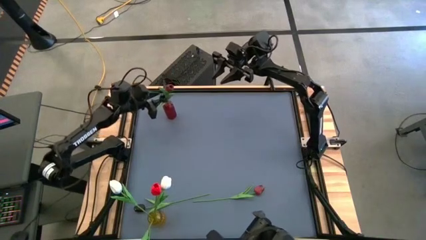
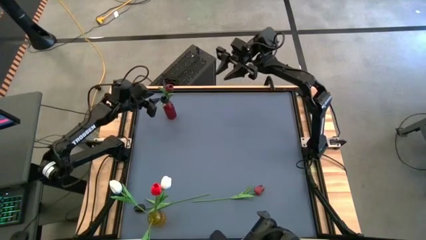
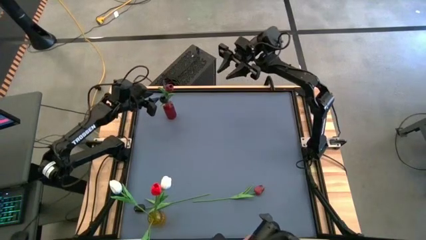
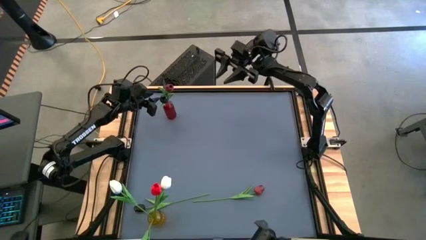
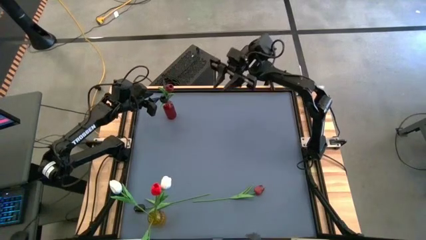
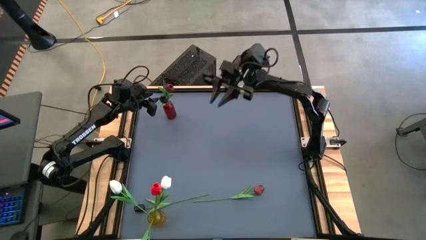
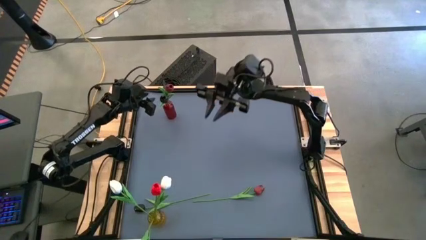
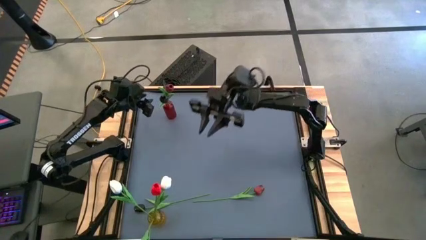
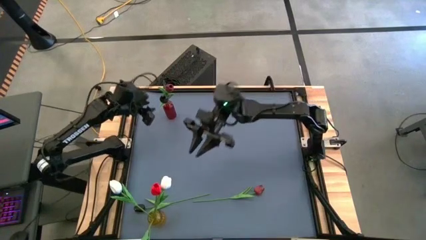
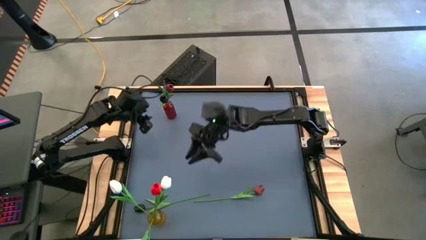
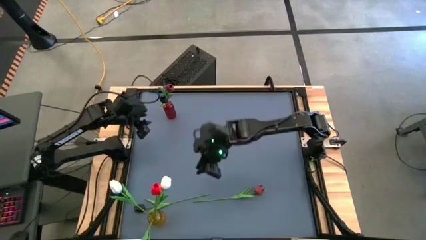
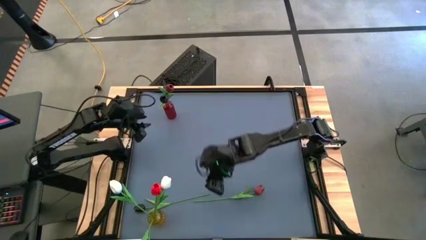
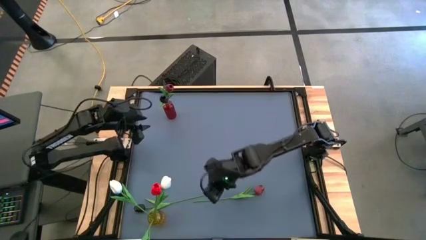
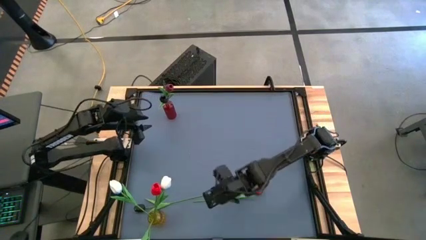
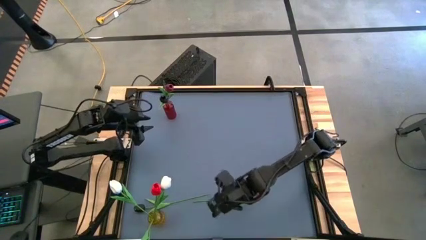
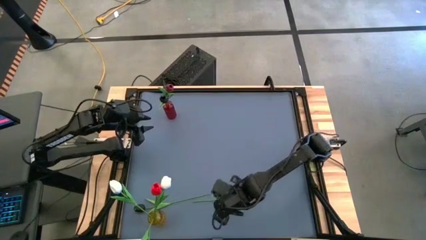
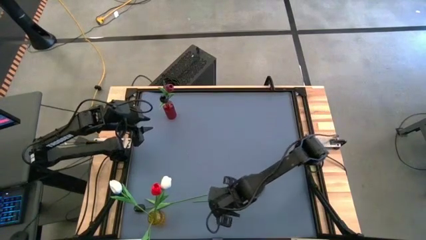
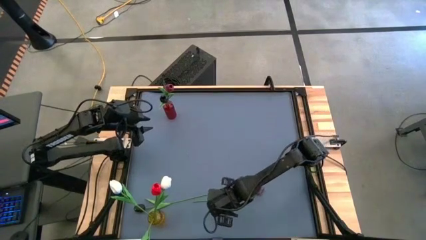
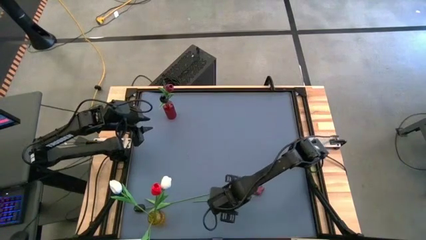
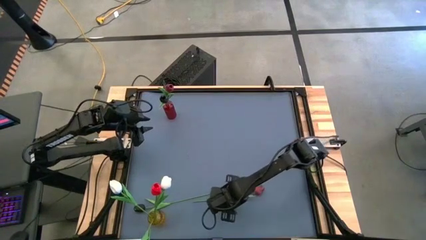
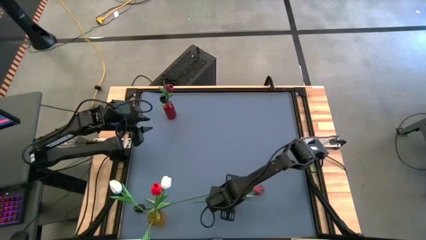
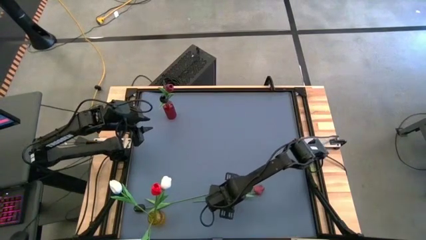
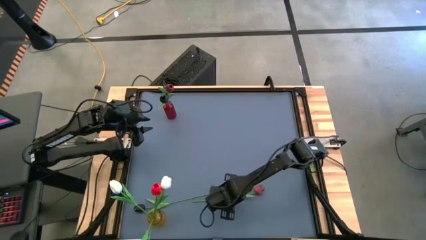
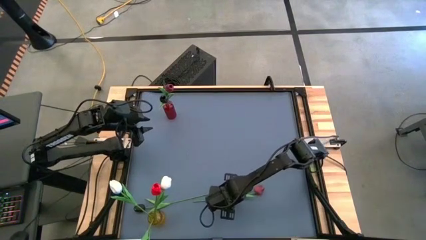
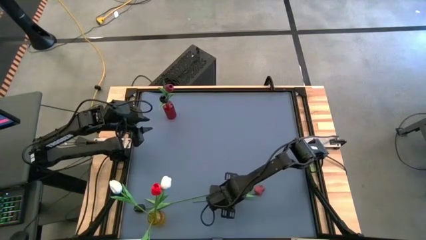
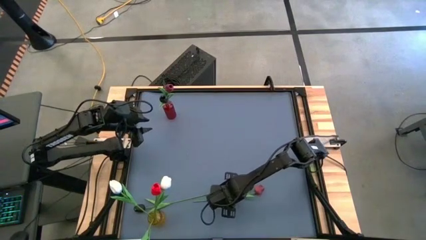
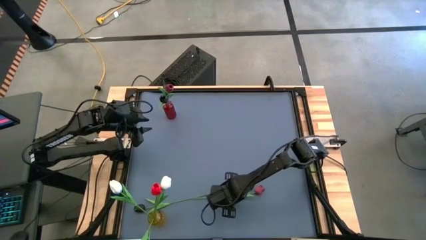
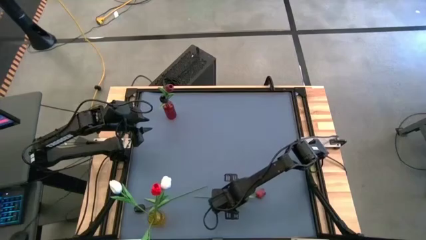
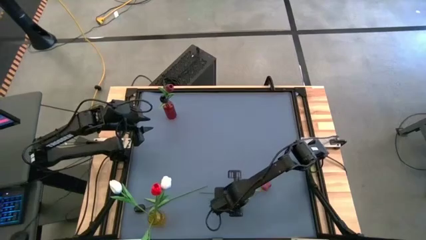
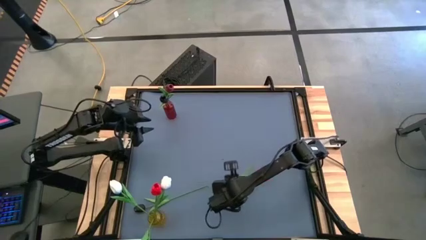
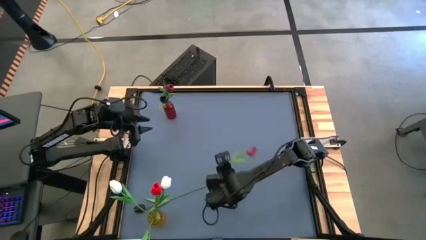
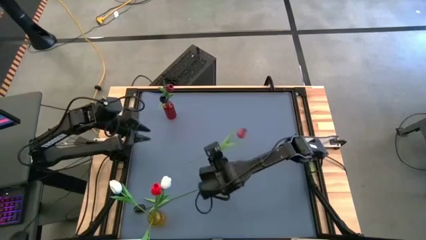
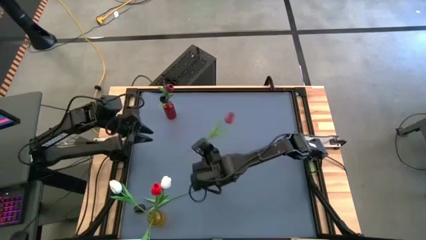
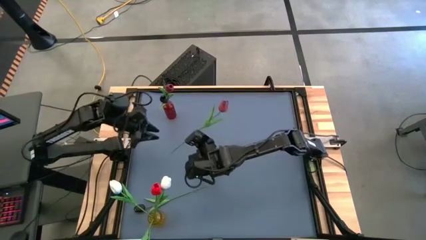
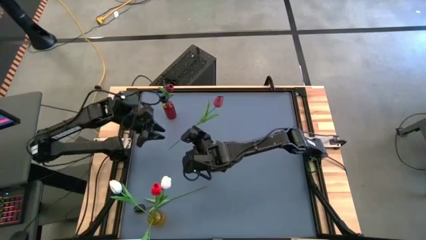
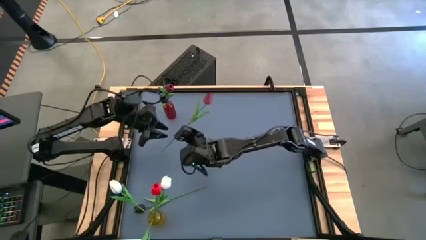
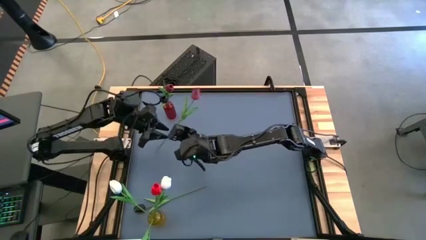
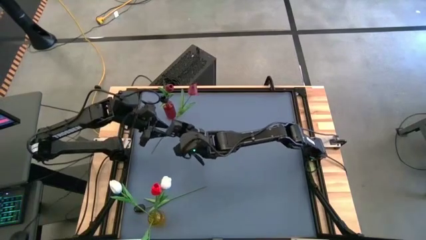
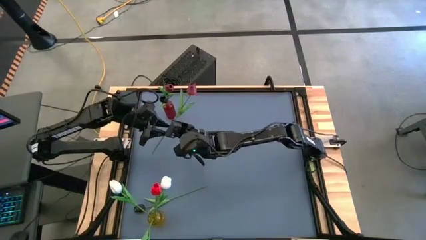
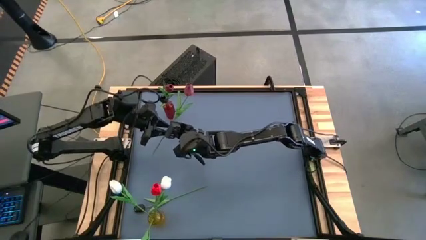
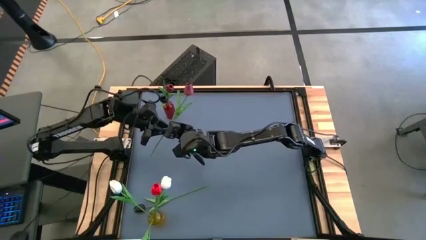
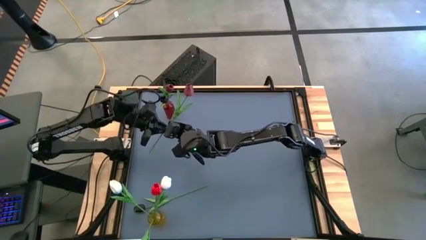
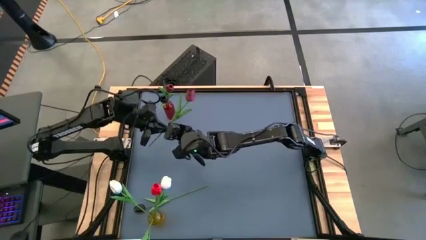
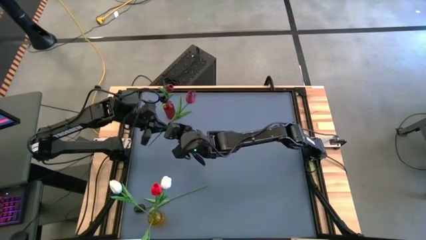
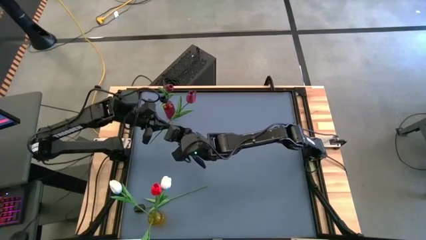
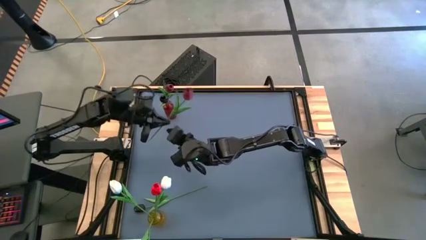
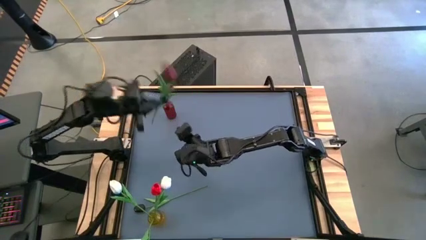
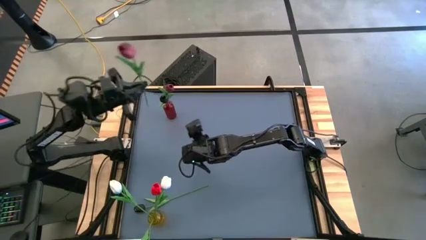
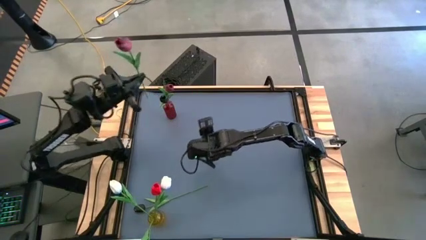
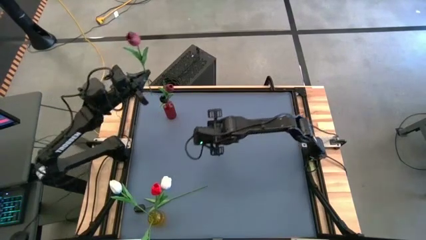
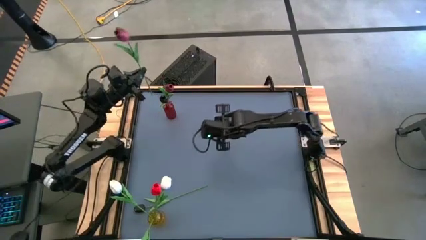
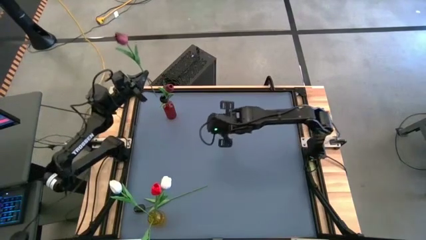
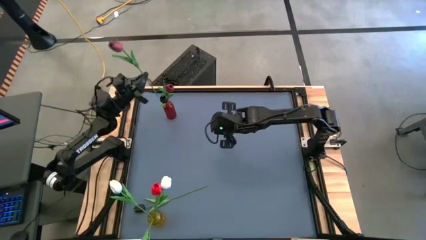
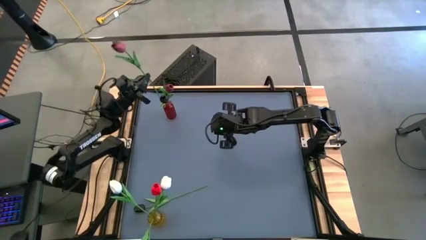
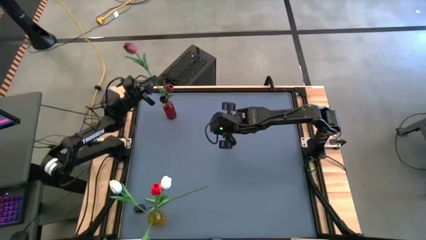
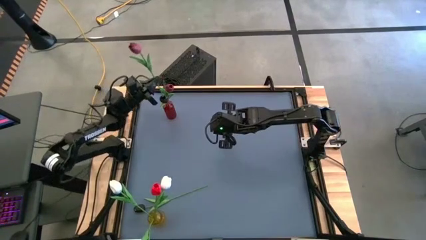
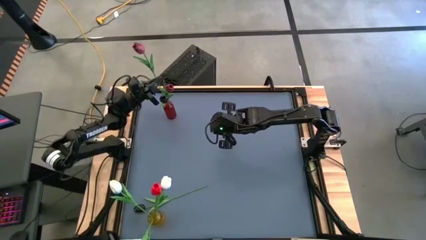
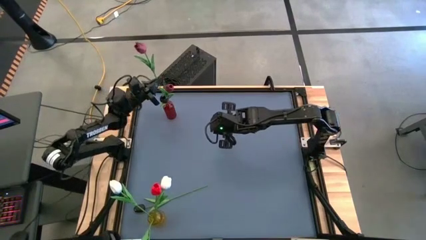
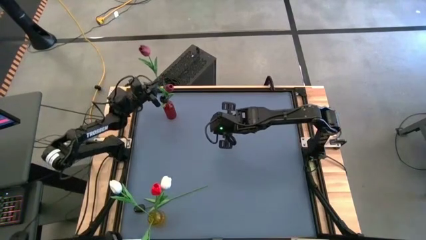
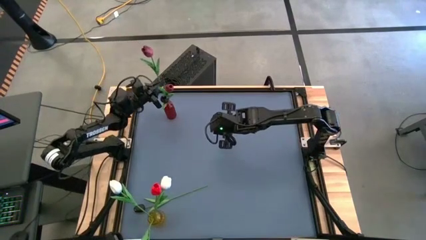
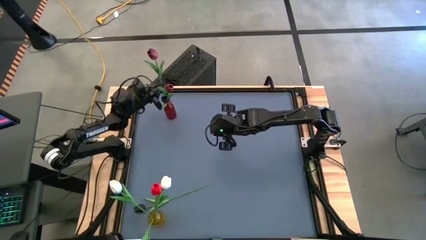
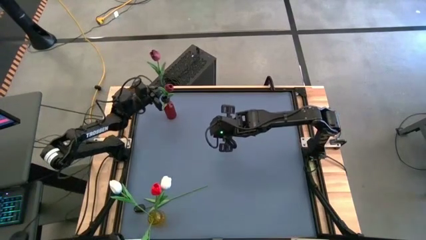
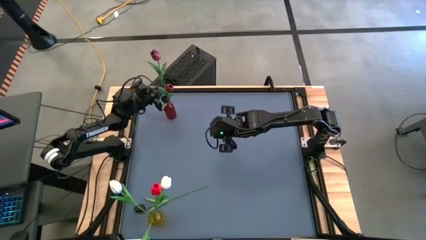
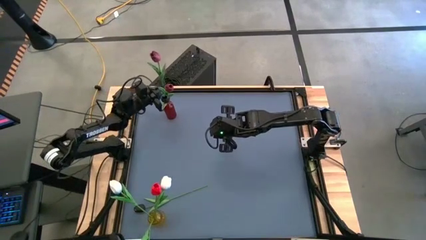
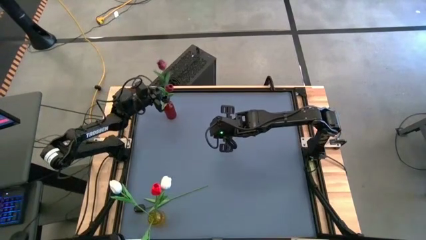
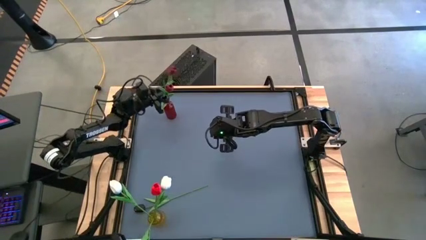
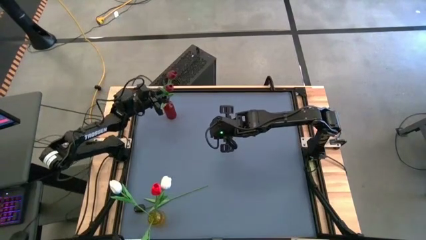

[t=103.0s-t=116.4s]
Task: Sort flowers into vase by color
Put the dark red tulip into the red vase
